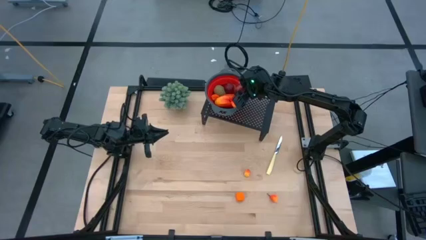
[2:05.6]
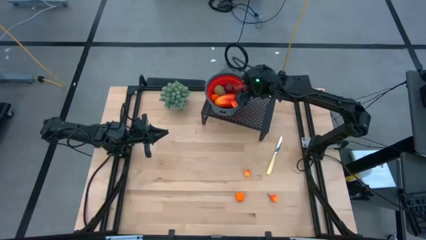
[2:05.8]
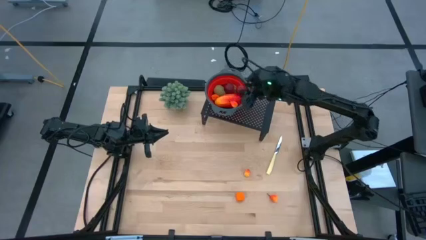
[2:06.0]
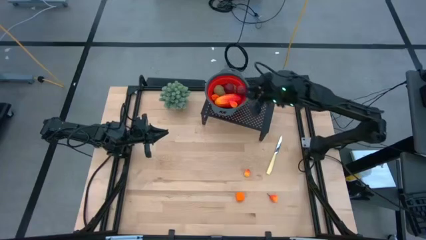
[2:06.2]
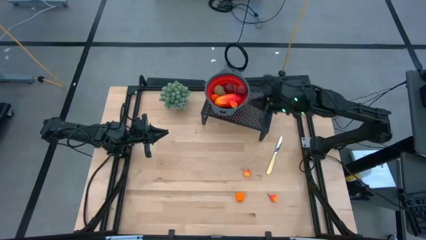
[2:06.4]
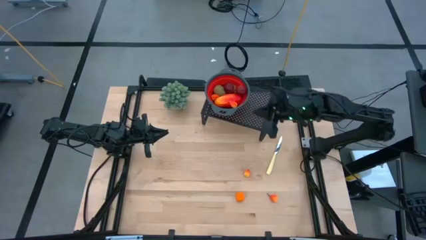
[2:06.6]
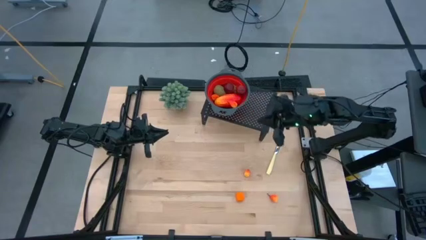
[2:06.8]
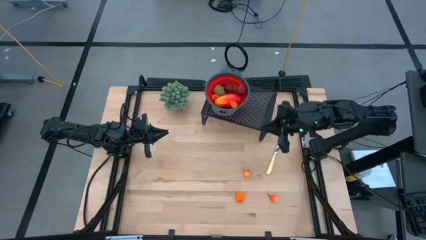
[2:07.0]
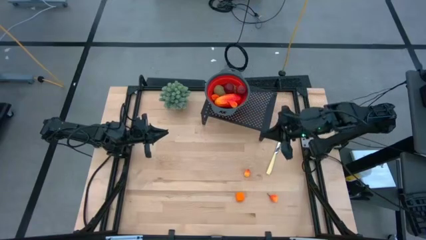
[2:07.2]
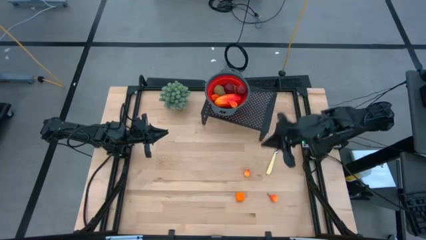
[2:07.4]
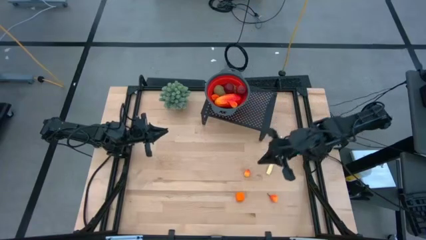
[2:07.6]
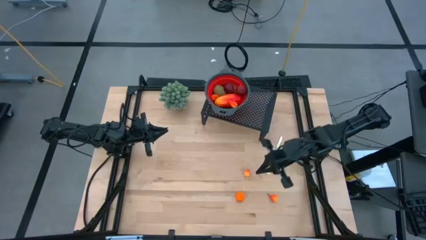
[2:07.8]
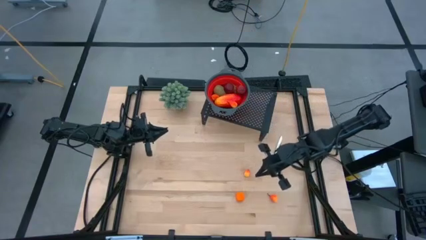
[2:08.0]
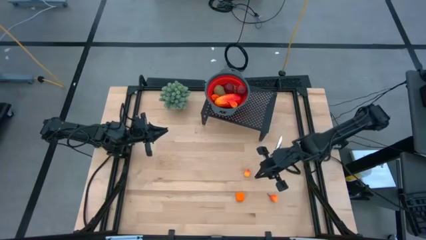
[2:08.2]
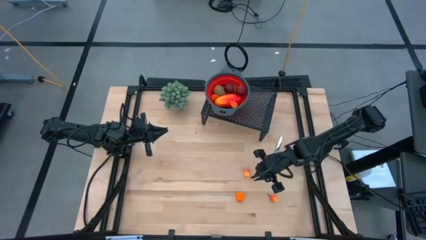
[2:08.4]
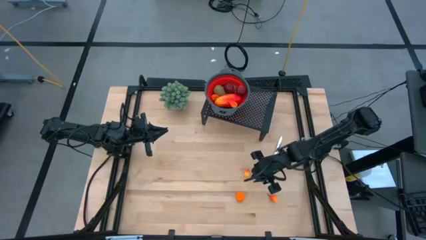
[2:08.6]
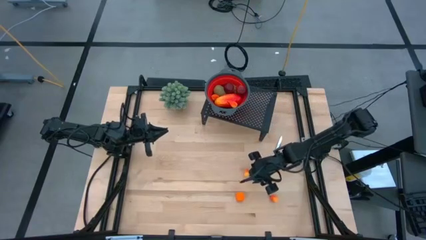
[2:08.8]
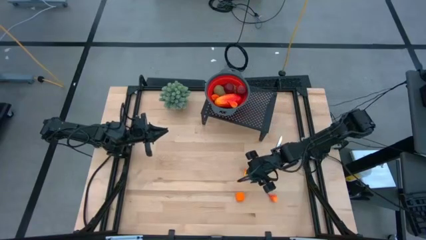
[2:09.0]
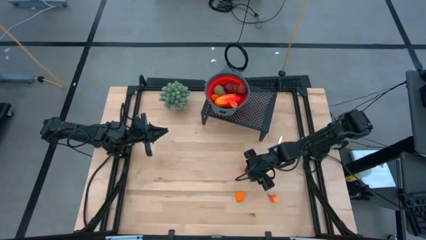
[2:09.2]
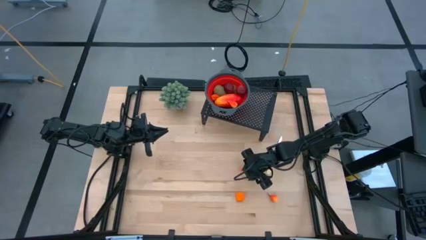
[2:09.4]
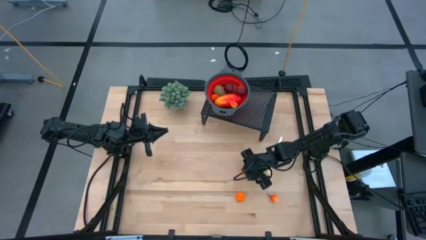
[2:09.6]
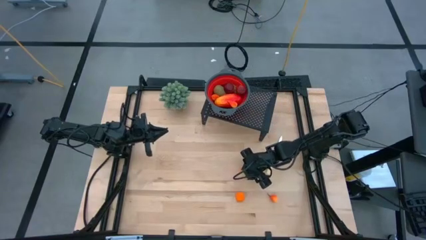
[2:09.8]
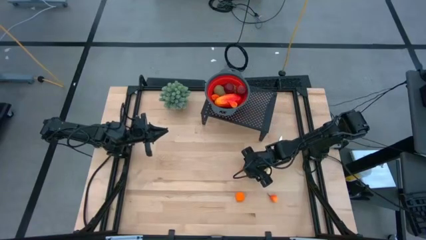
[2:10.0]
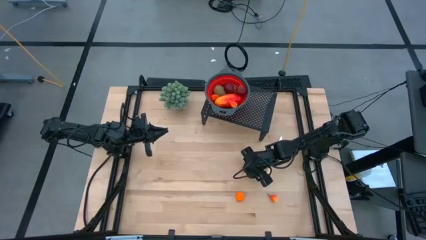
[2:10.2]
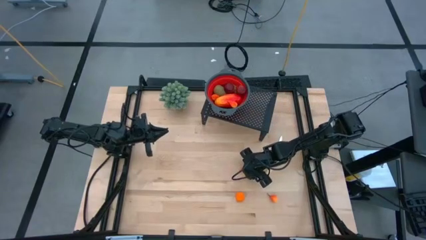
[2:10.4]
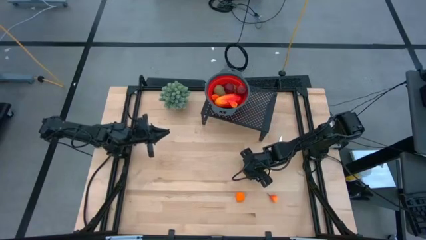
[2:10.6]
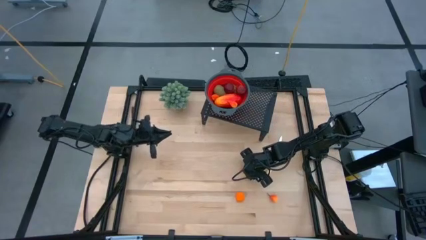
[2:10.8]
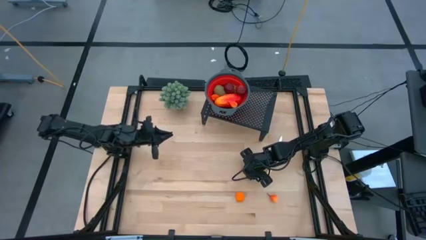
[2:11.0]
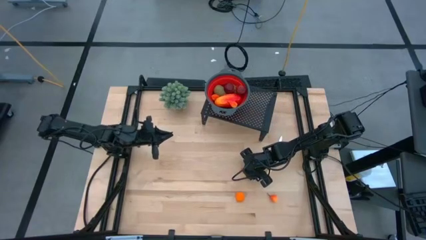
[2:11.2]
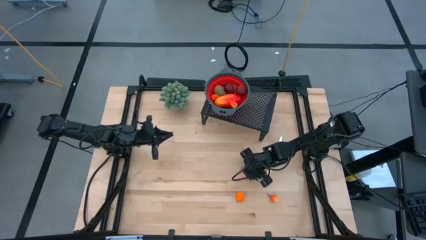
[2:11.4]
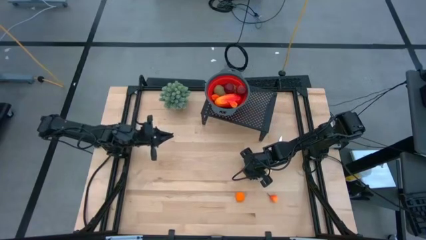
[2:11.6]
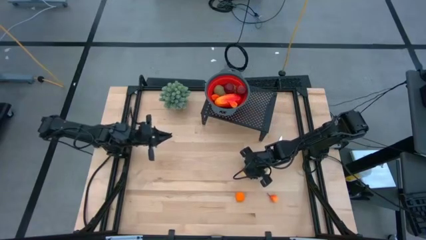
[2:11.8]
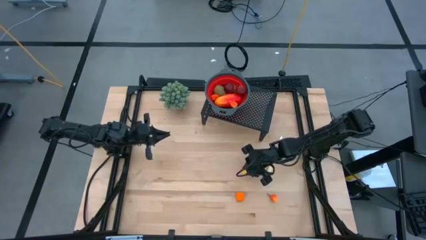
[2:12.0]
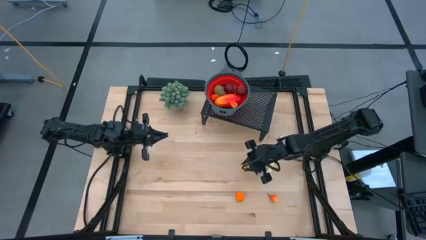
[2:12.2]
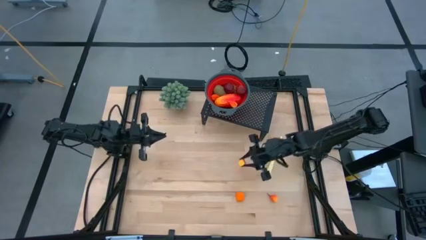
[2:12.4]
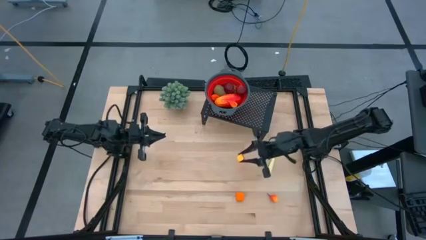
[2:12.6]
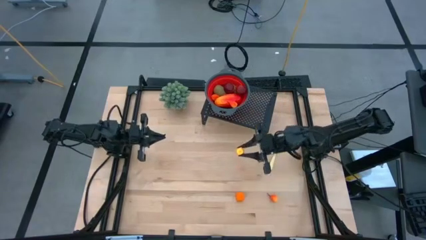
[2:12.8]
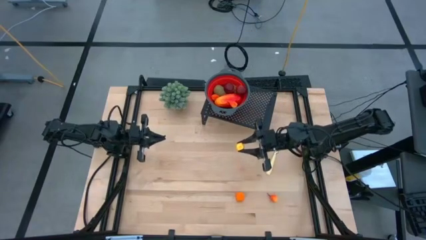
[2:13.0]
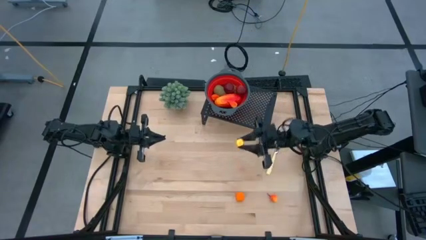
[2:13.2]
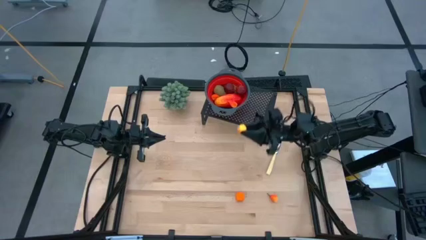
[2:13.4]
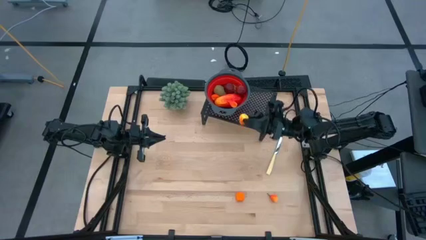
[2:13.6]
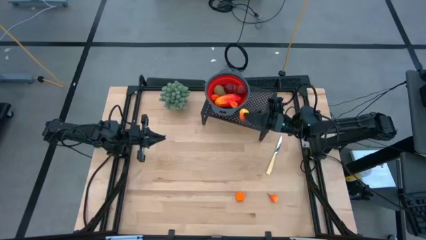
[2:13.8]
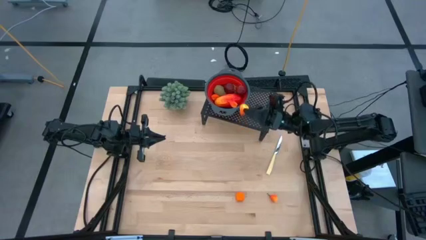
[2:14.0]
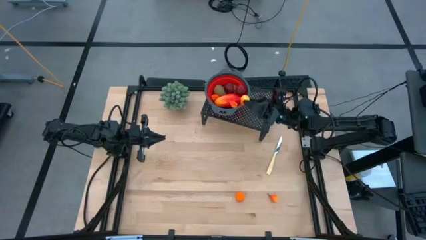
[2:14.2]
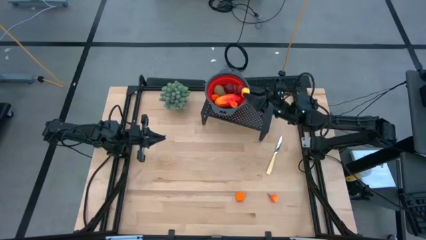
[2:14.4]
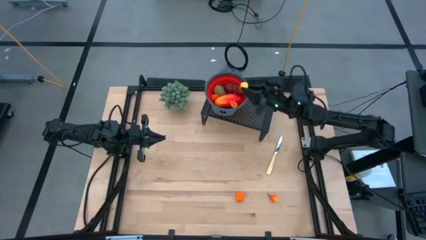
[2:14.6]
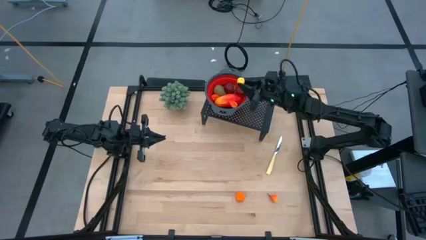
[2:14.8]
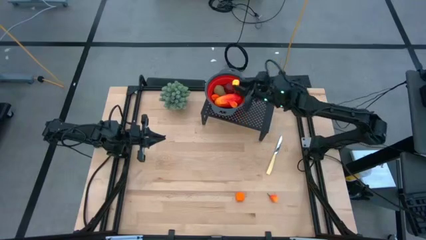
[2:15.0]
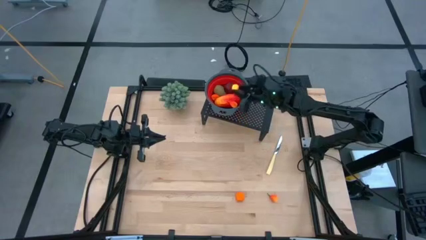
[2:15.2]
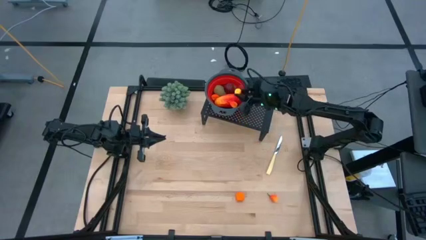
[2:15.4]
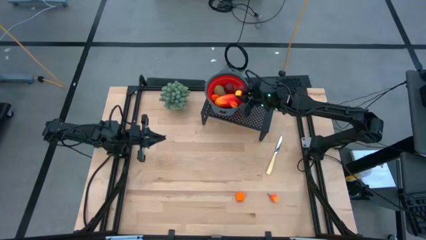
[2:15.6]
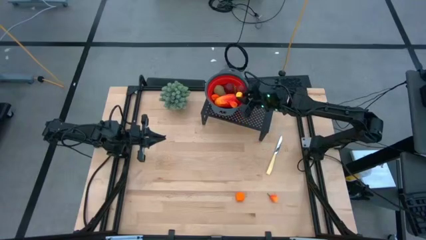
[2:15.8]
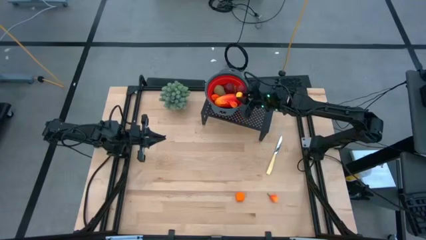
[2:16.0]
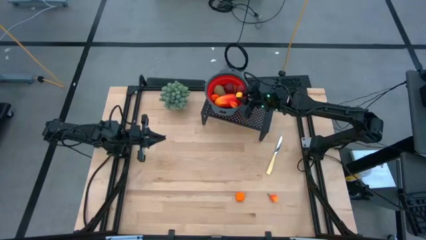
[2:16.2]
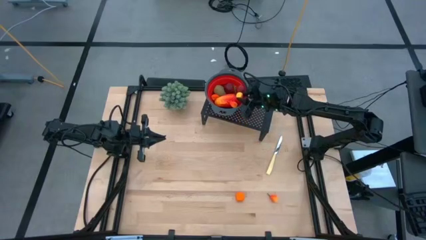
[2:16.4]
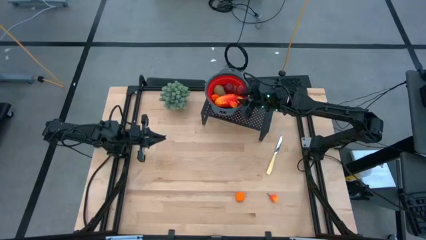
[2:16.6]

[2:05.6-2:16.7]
Task: Pick & Place Fruit
Put the pear into the red strainer bowl

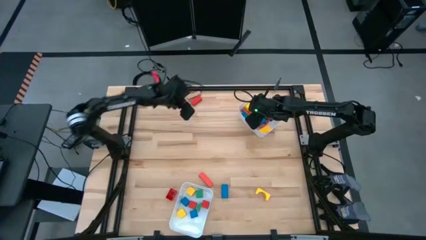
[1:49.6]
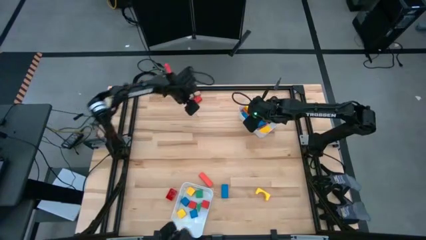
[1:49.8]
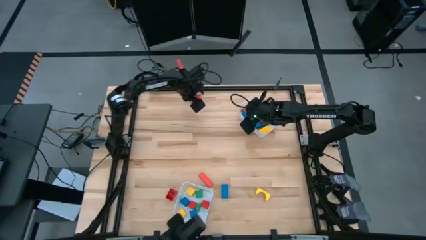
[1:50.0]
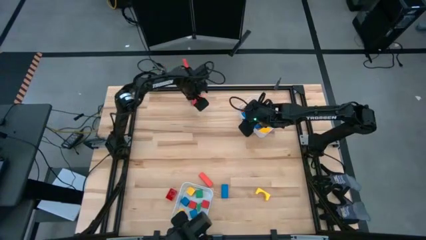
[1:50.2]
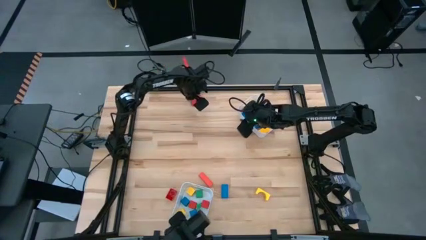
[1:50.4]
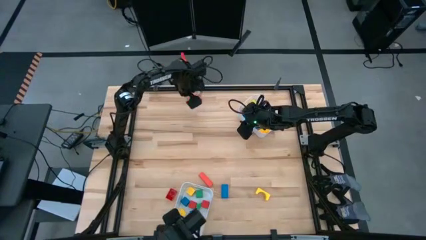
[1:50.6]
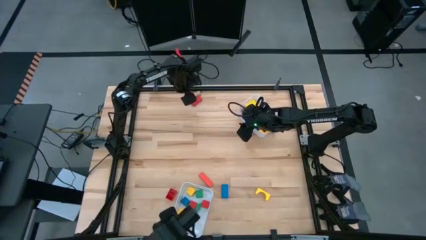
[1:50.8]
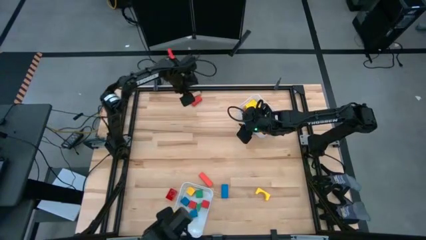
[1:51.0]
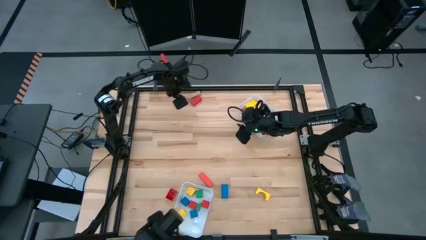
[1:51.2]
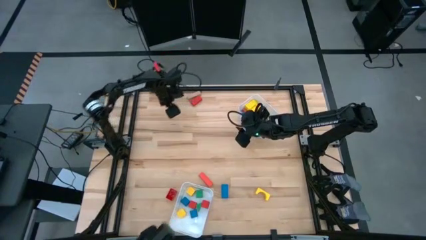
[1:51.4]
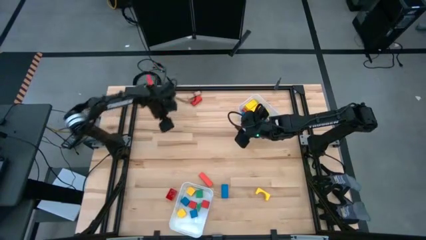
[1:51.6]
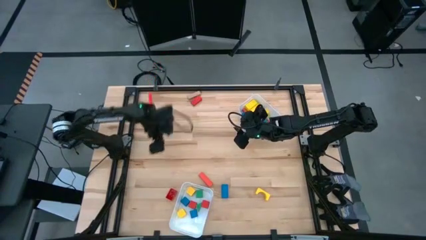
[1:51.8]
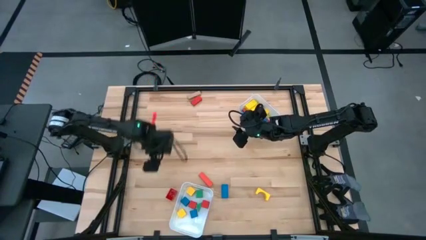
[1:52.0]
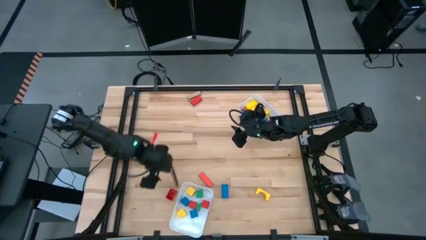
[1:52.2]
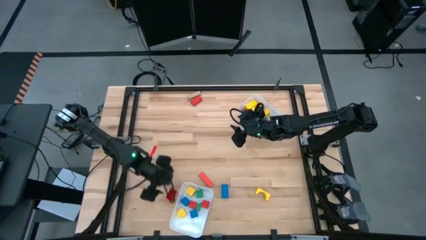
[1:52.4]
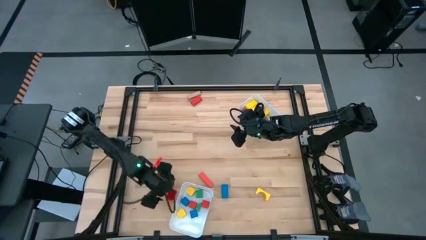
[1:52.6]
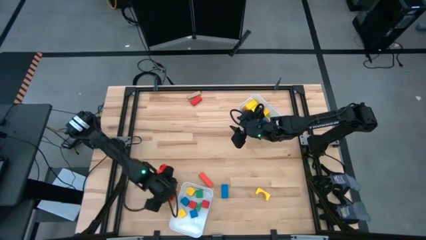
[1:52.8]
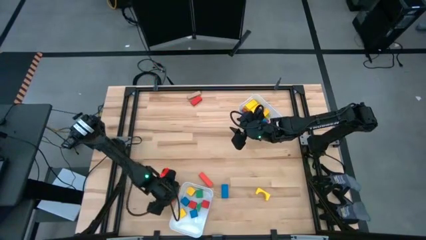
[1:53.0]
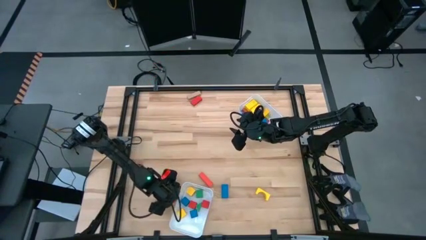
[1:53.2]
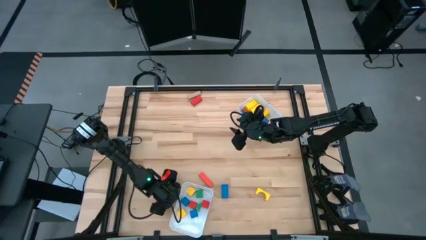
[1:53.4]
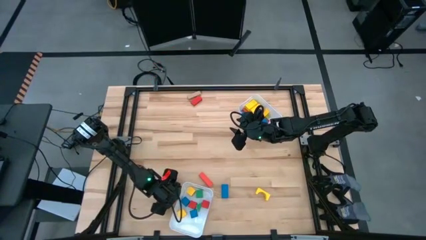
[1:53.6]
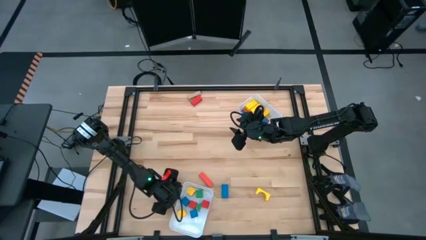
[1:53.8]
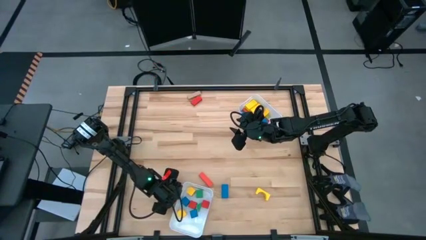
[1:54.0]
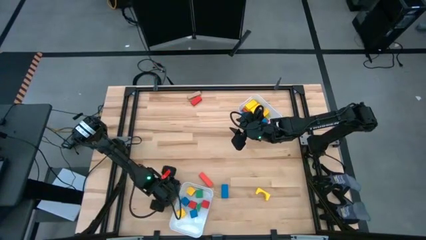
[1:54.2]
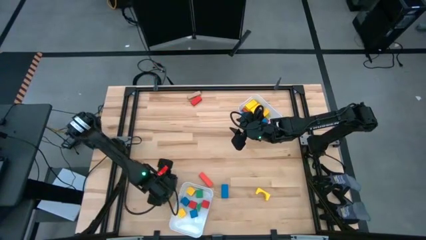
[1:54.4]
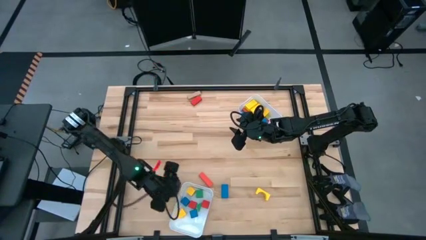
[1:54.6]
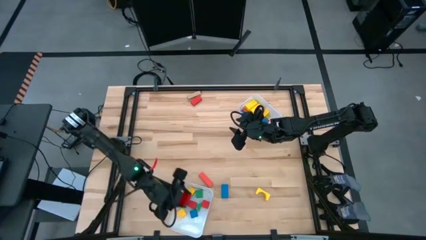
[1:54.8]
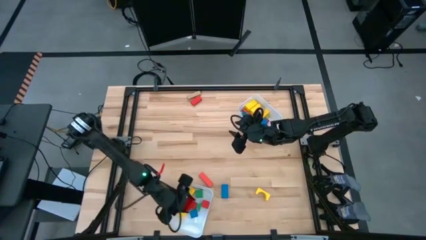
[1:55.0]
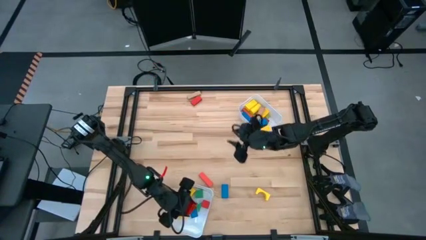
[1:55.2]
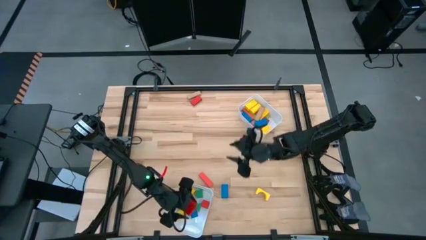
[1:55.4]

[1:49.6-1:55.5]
Task: Sort blocks by size
Put the red 2 stud game piece block into the bottom white bin
